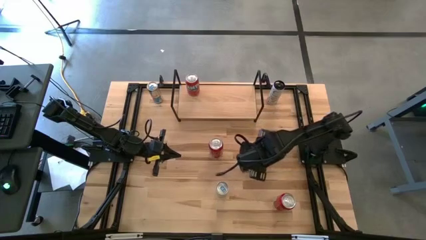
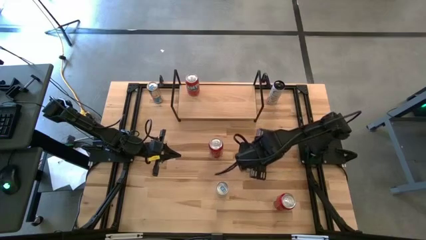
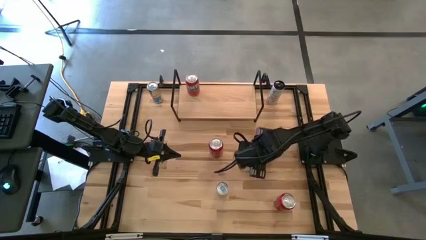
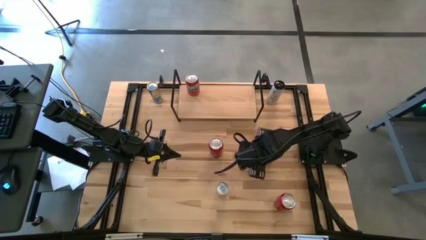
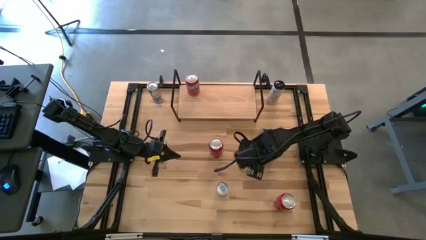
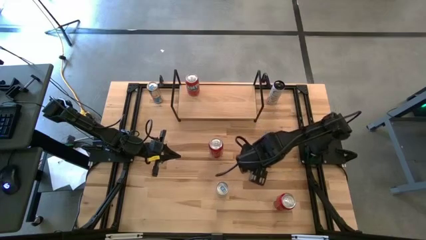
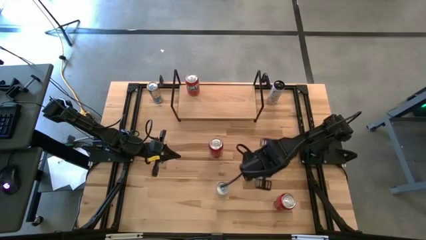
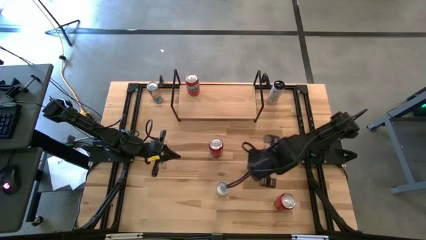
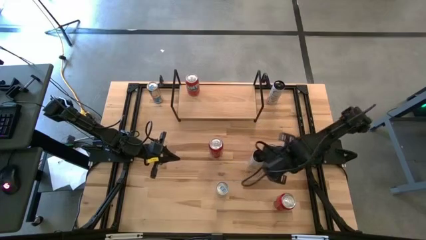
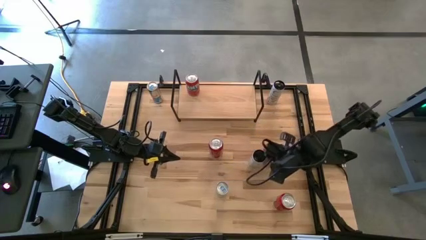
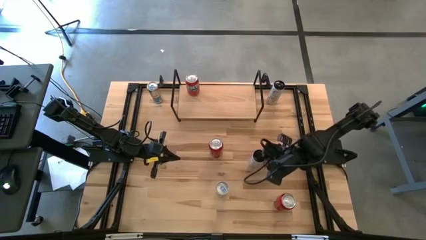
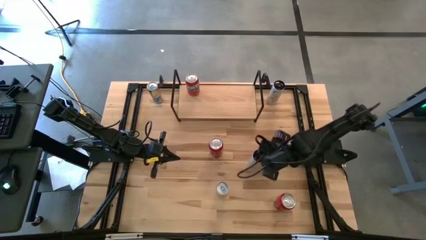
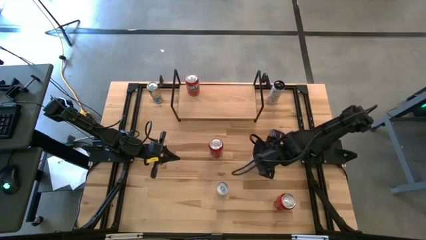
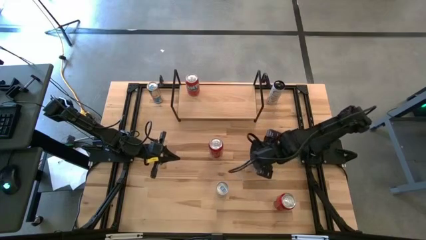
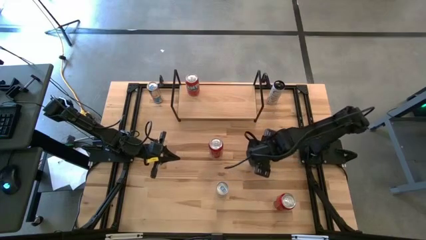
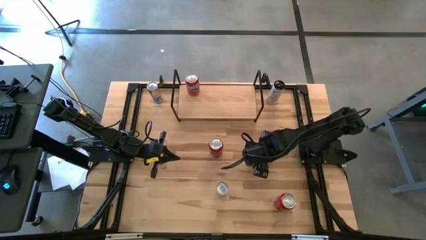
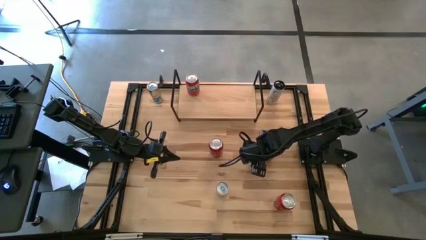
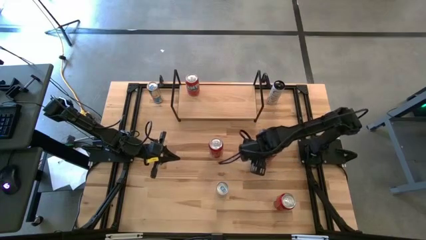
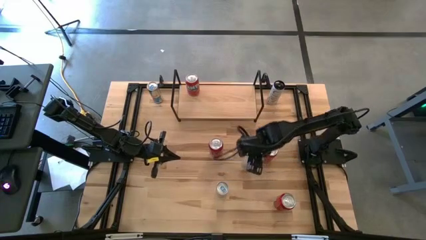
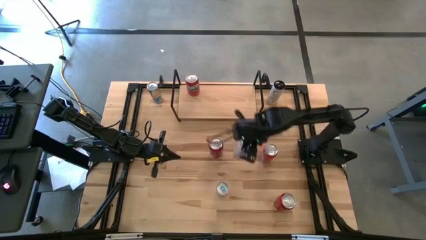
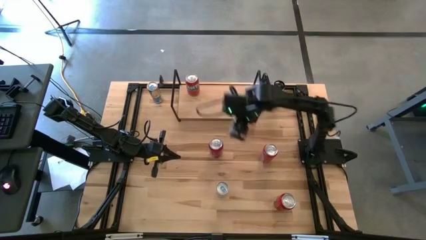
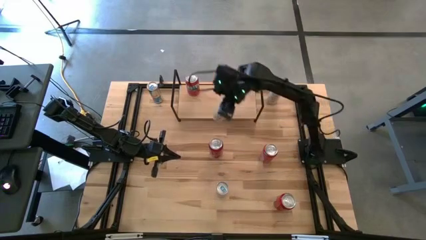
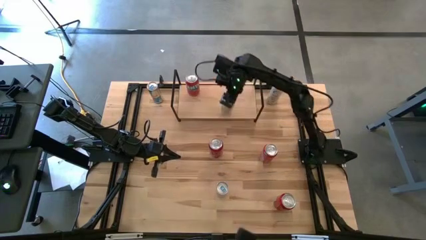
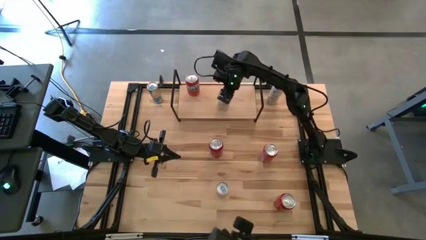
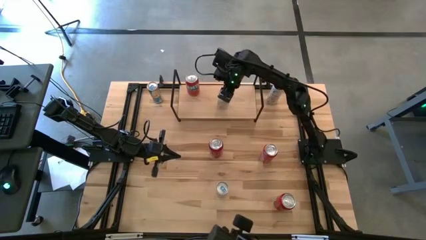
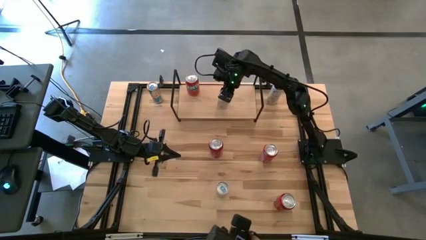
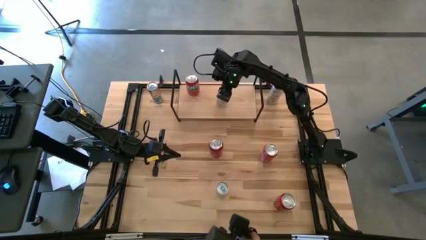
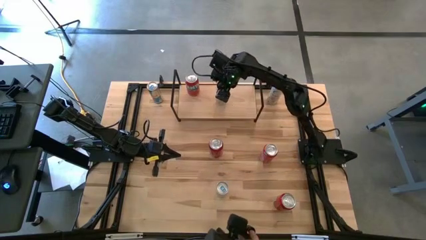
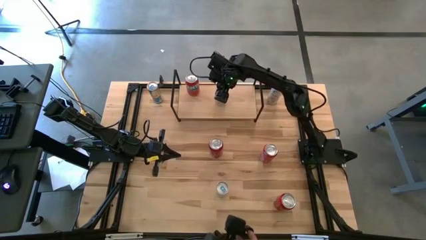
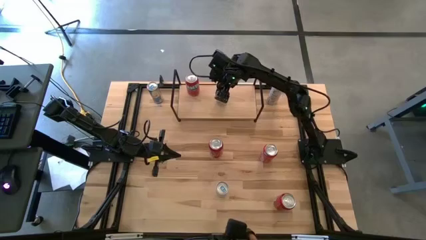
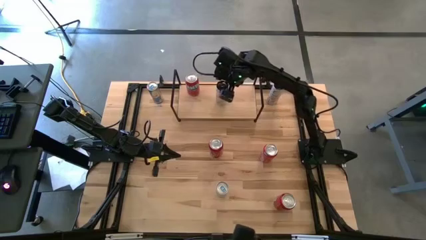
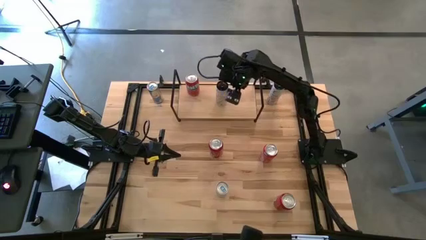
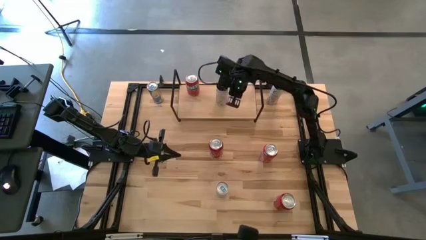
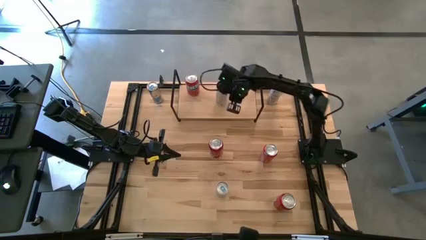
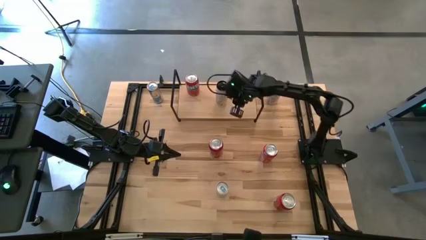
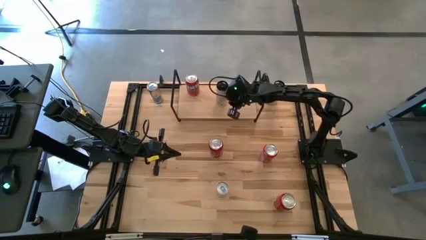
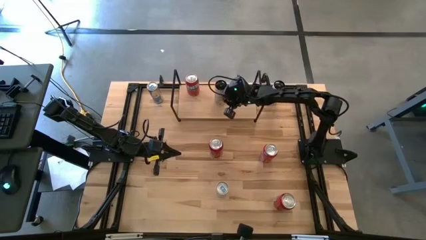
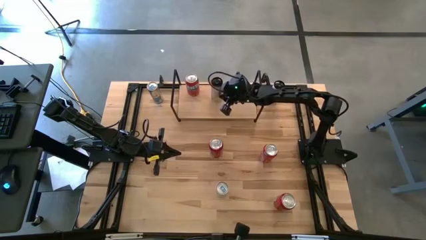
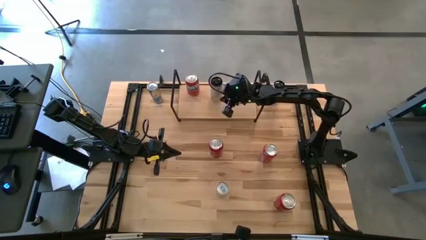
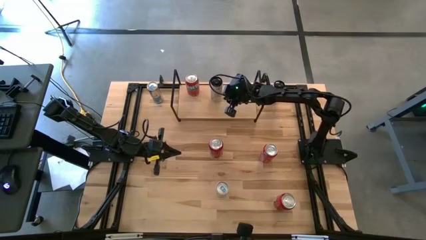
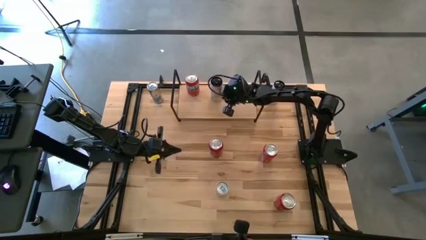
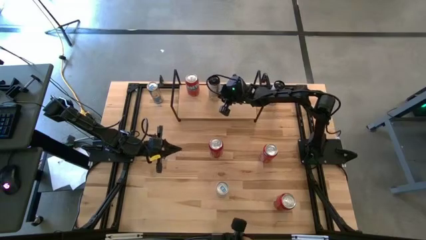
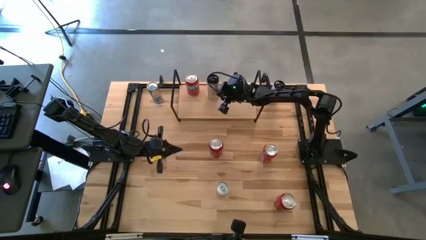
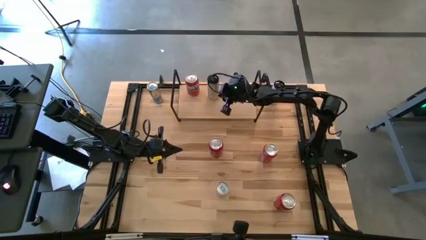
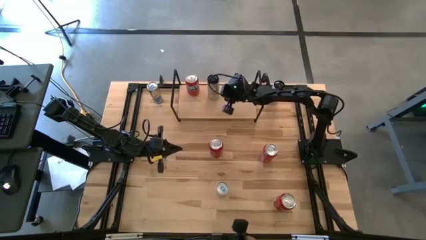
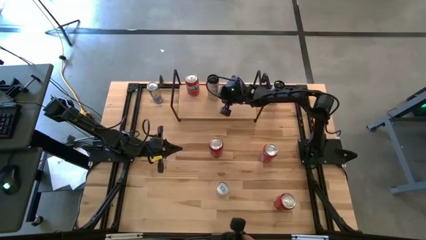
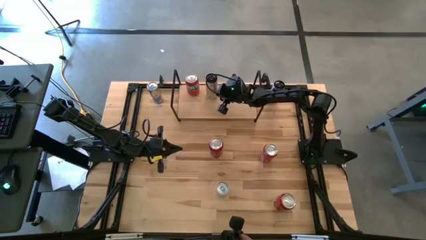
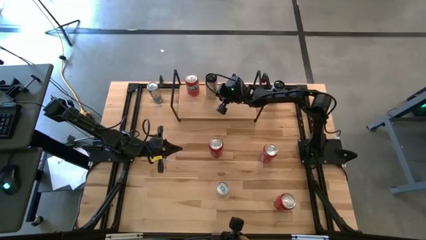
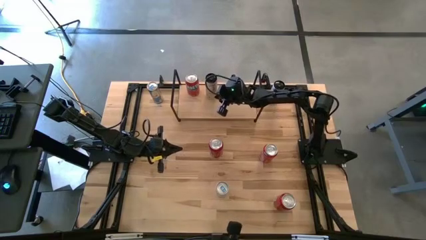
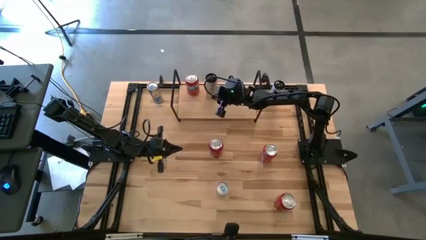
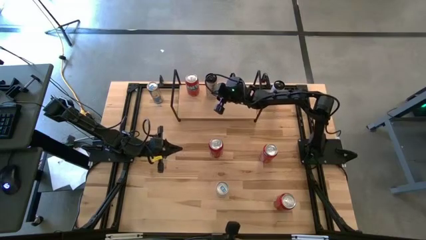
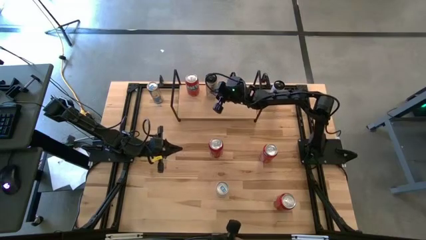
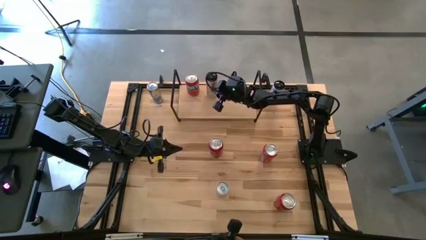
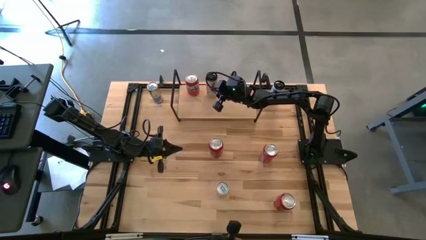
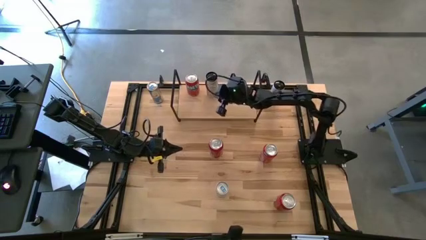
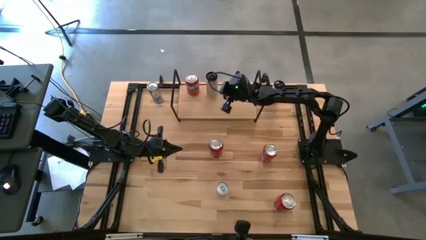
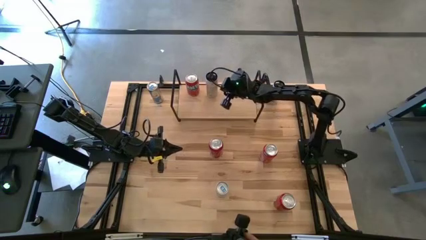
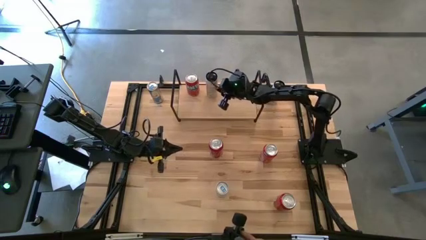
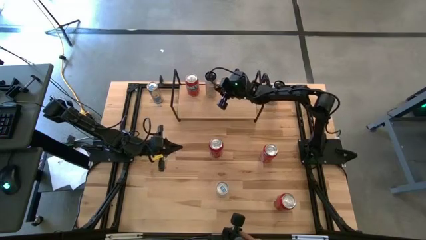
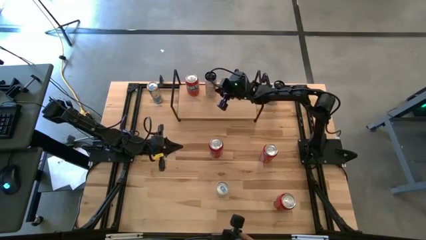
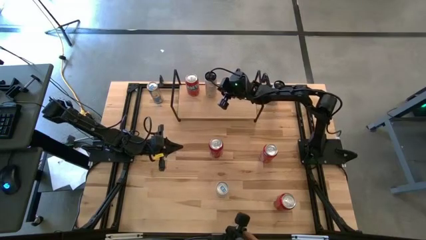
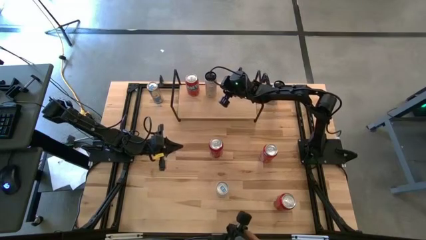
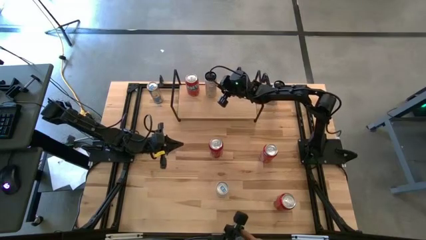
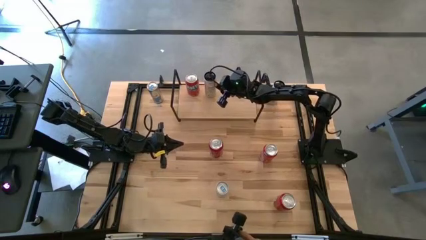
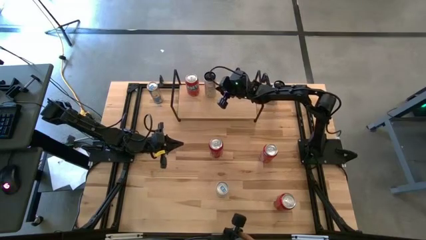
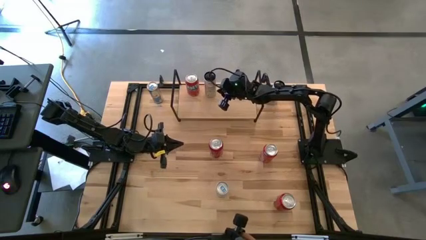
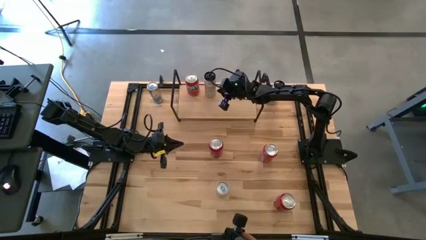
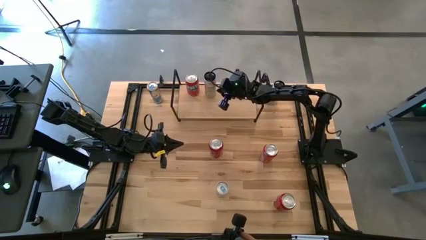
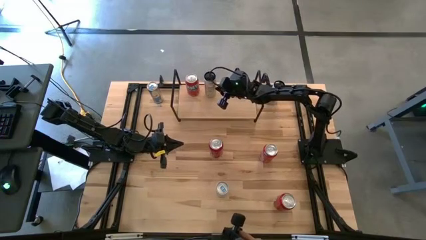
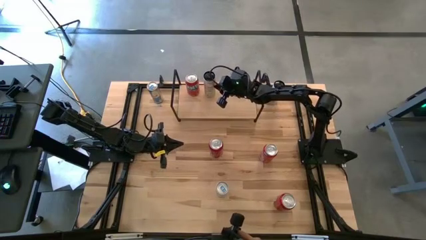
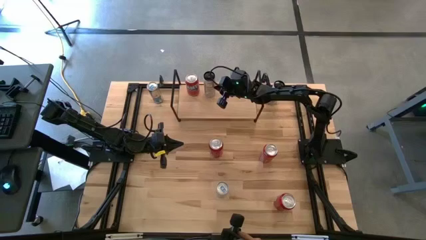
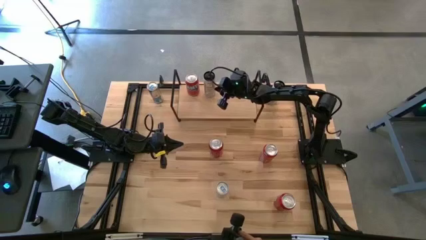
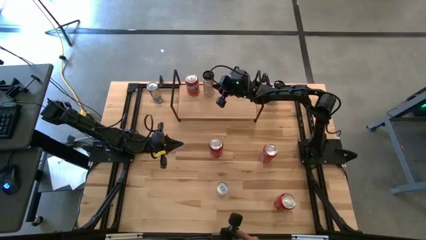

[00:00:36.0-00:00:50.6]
Task: Place canned beverage on shelf
Put the bottom white yellow soda can on the shelf
